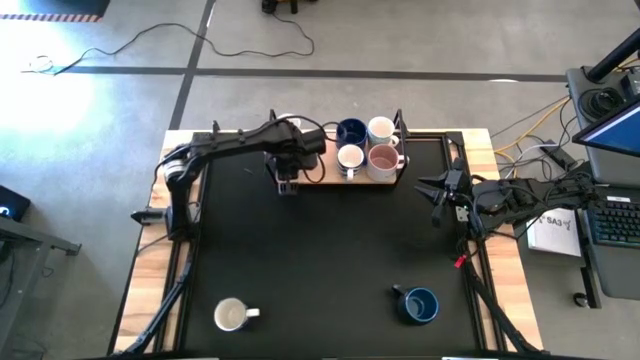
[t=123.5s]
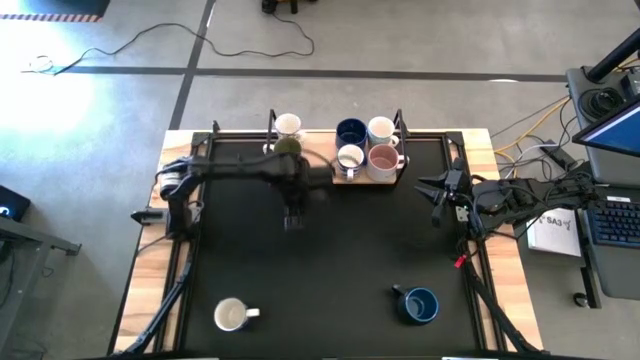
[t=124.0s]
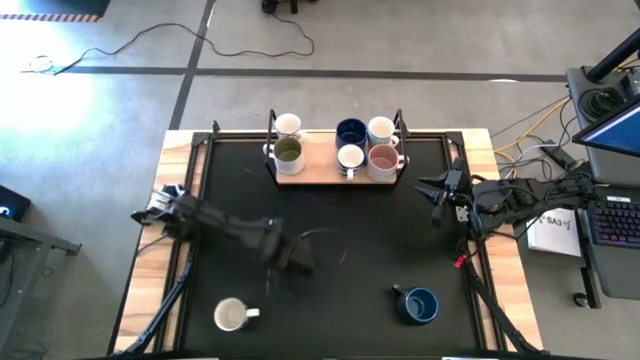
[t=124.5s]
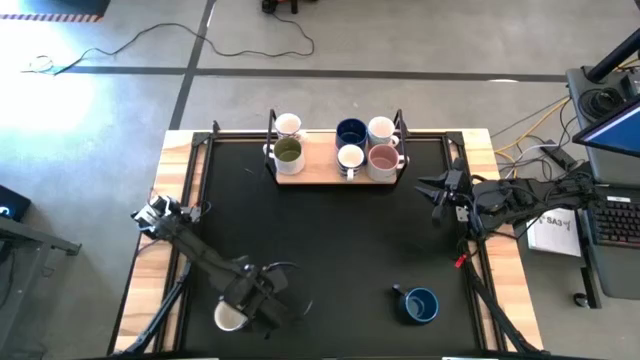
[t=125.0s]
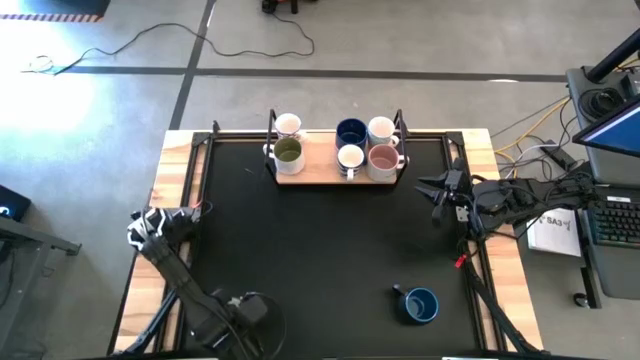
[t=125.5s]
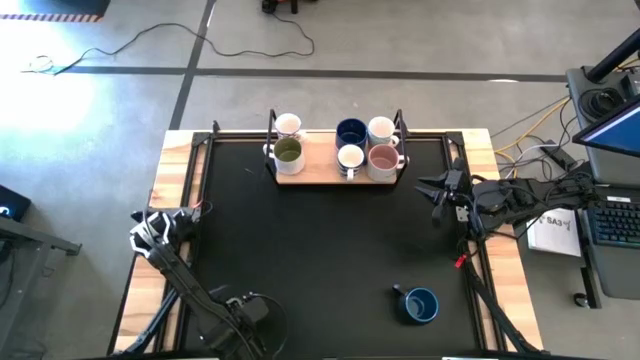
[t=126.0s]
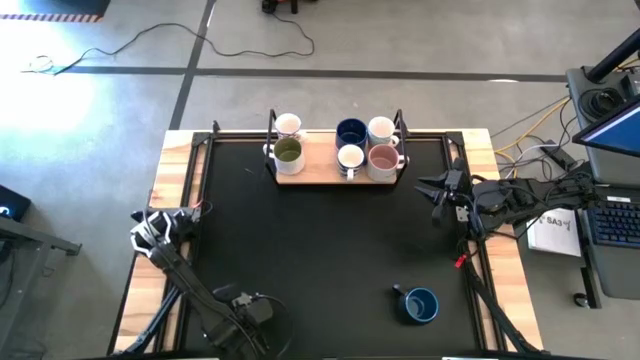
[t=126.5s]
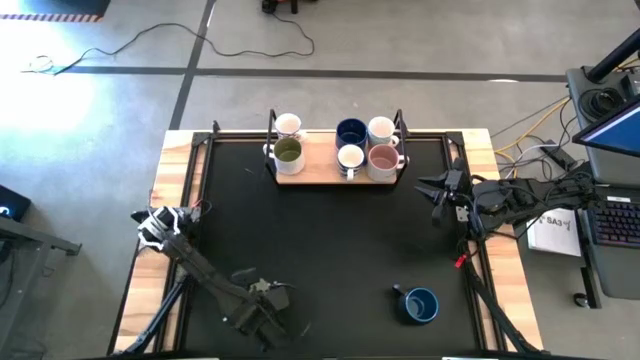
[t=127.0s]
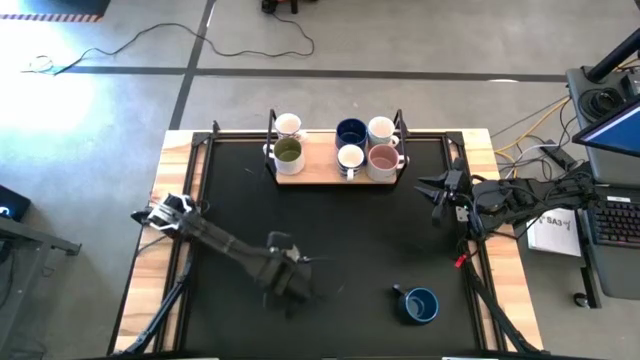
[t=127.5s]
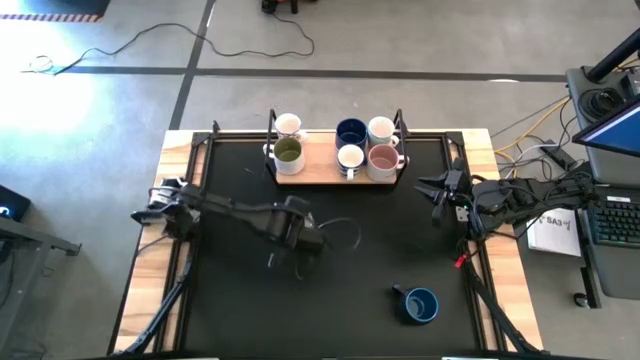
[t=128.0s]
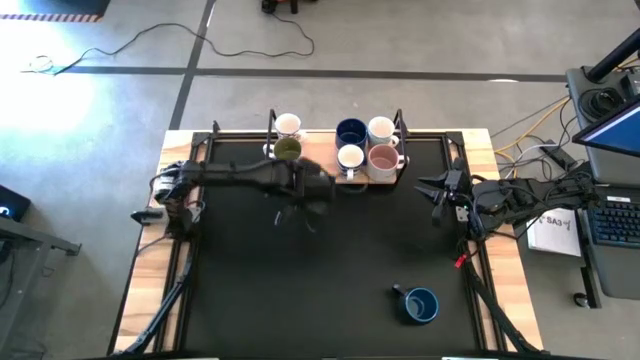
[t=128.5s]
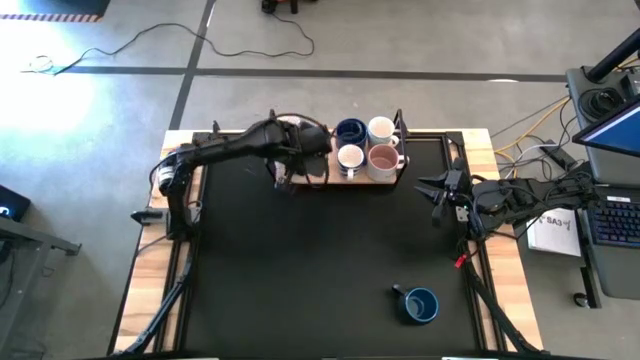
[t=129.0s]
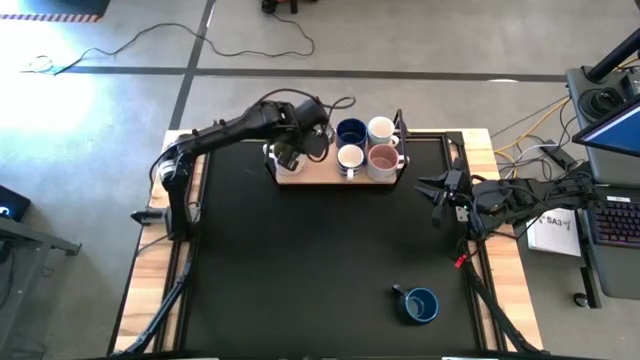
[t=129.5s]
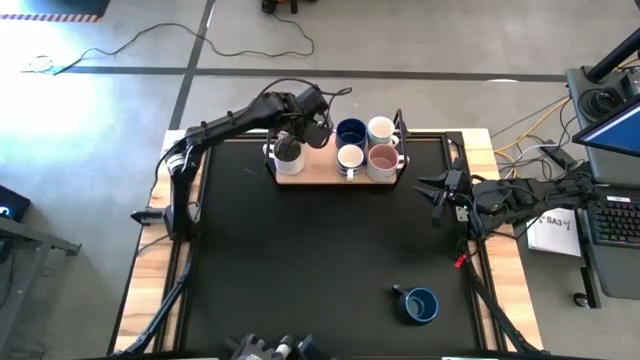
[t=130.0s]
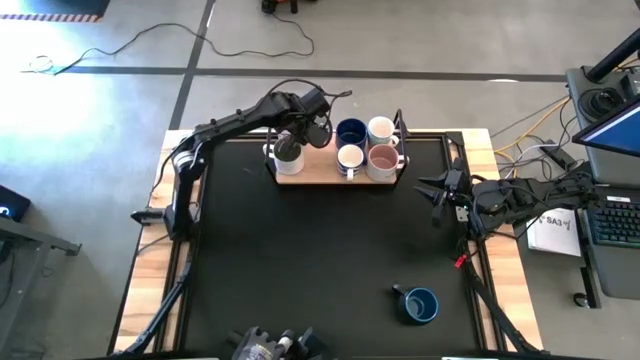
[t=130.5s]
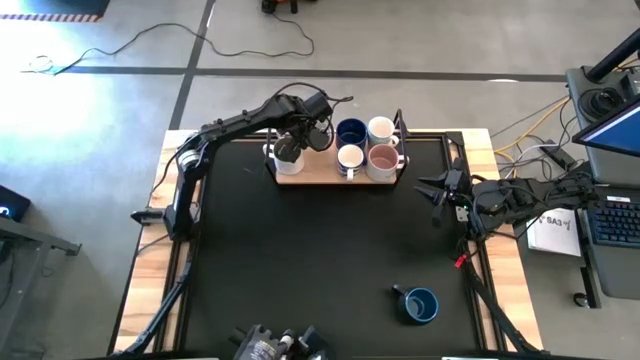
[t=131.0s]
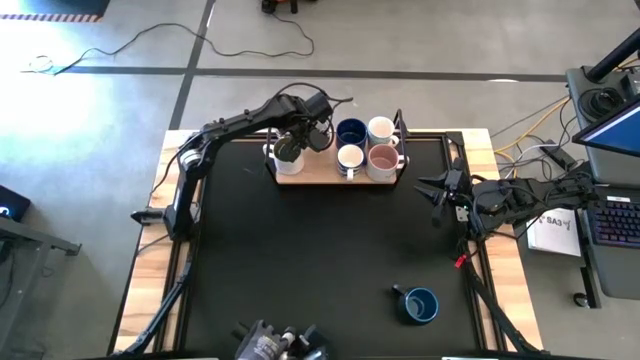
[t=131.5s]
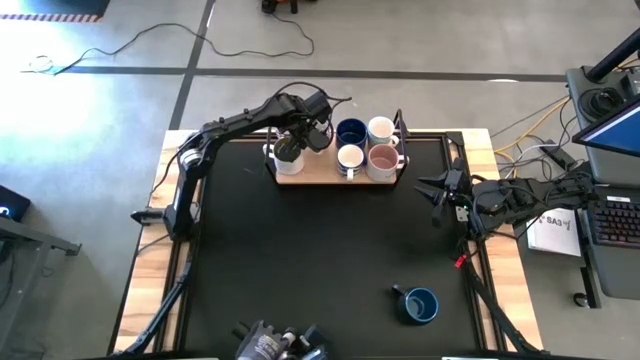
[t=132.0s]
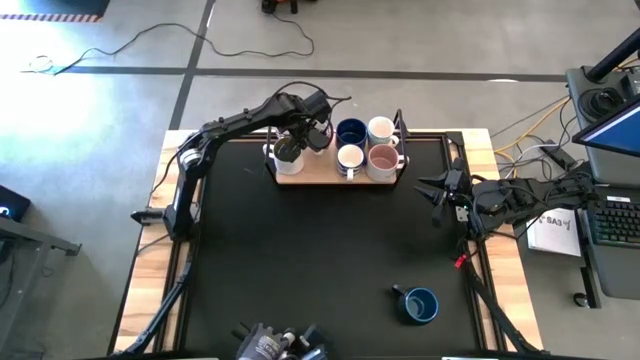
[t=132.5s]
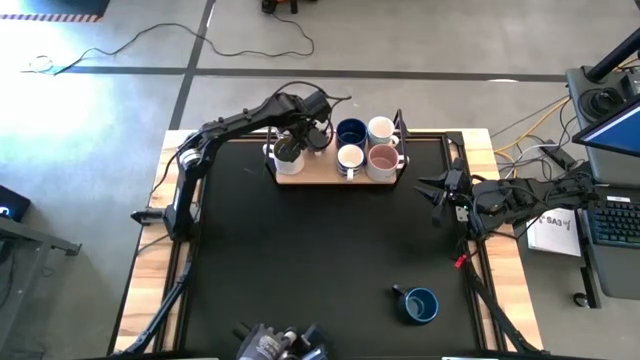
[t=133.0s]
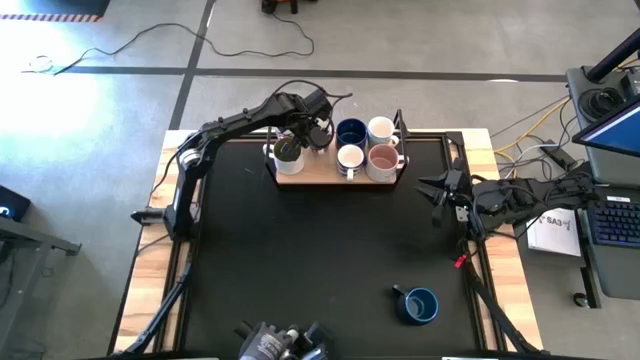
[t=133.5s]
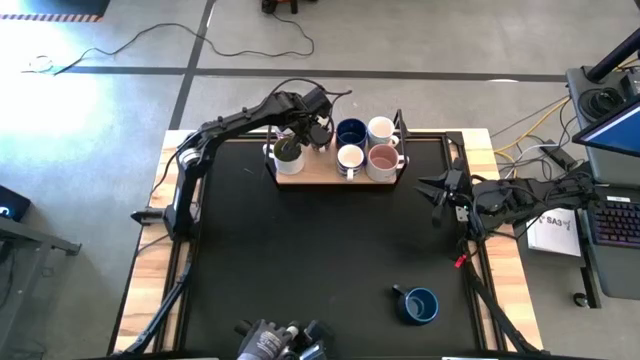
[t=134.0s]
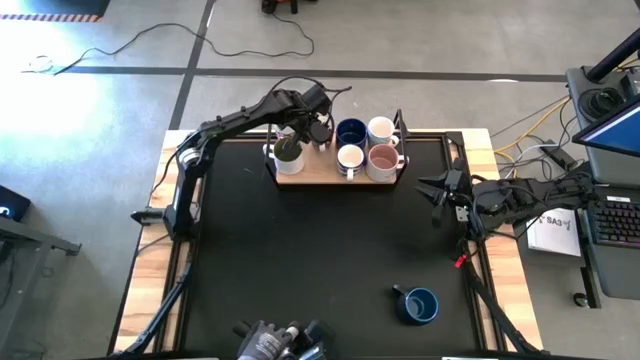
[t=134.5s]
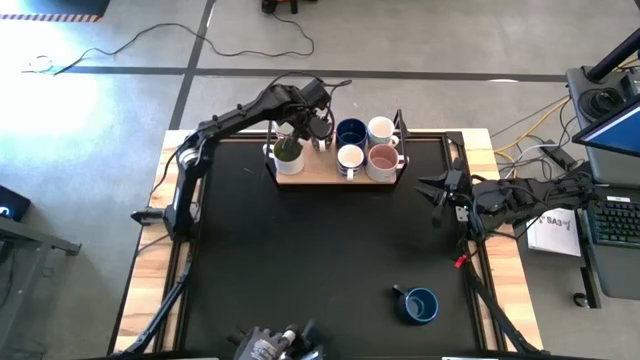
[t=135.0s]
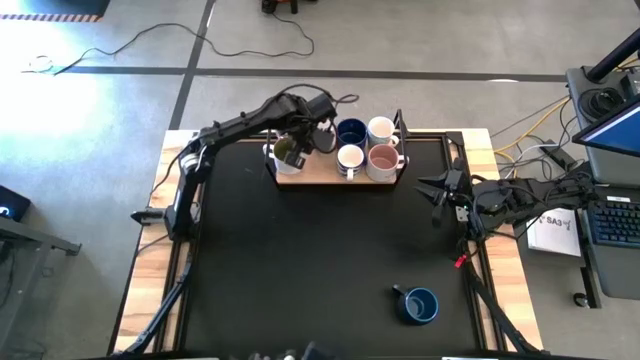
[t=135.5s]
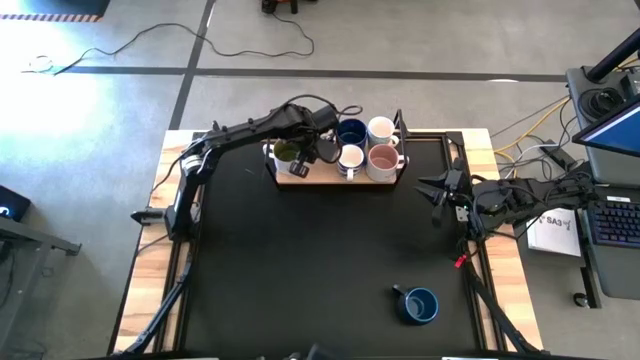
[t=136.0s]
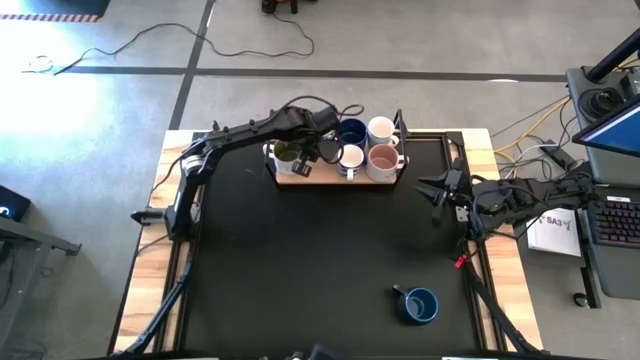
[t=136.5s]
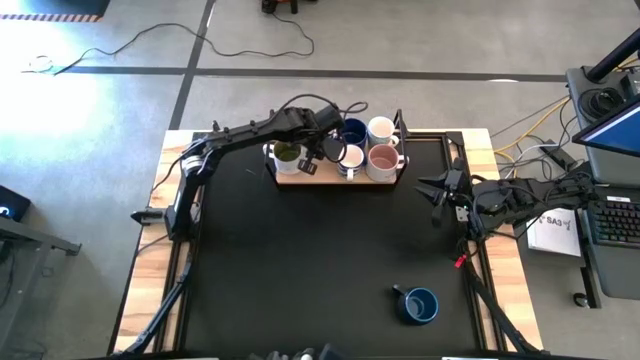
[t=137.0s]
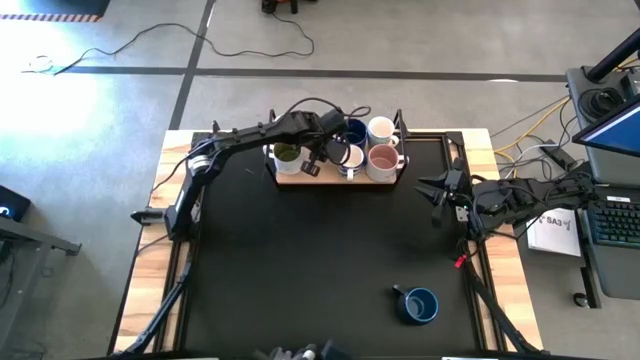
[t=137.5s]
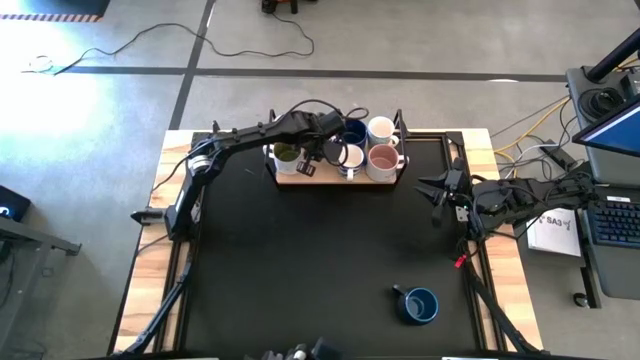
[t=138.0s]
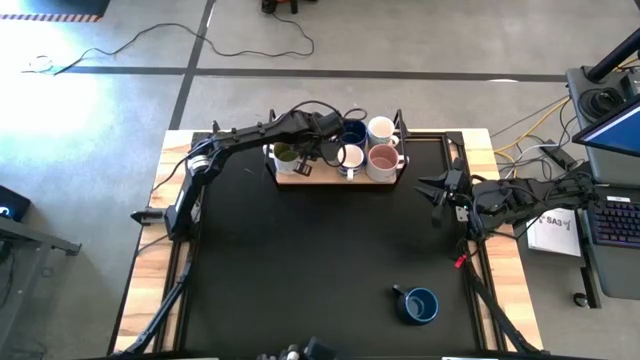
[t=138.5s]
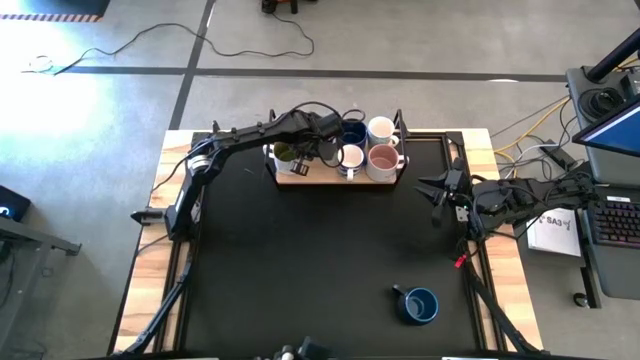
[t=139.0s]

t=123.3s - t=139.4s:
Task: Place coffee mugs
Put the blue mug on the shelf

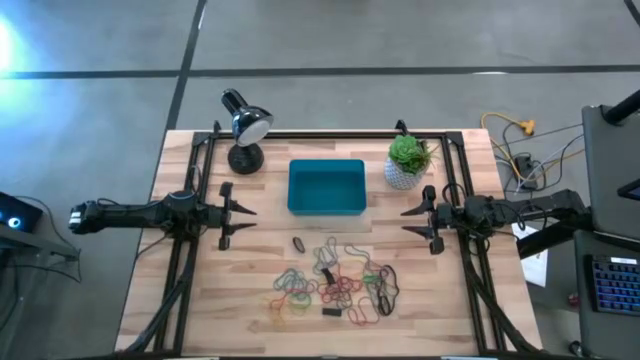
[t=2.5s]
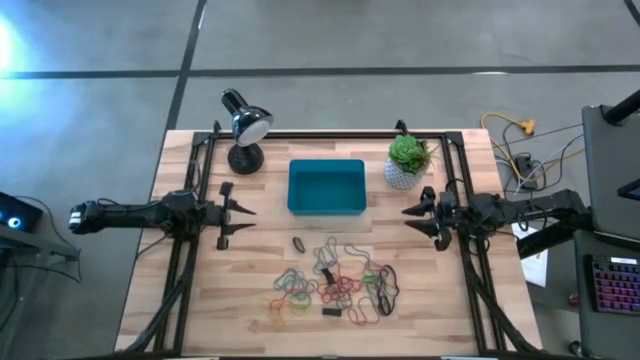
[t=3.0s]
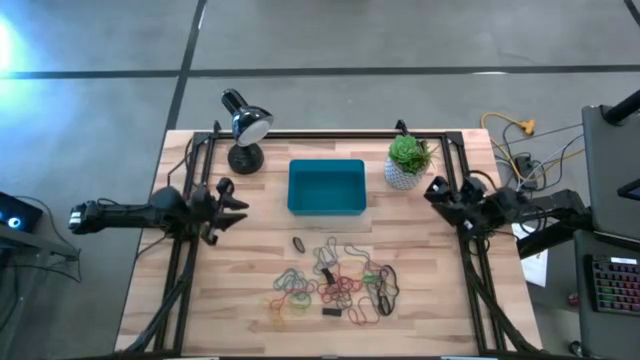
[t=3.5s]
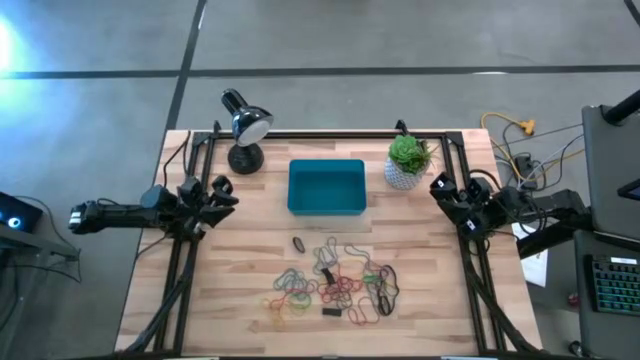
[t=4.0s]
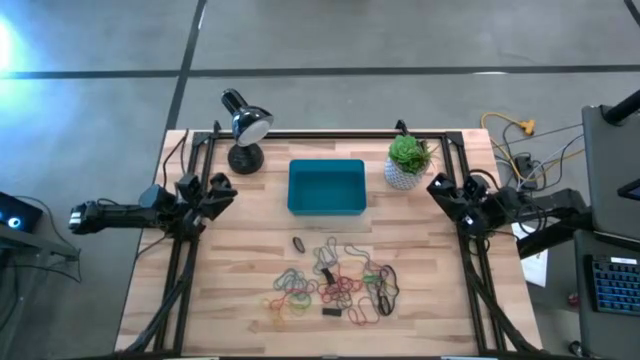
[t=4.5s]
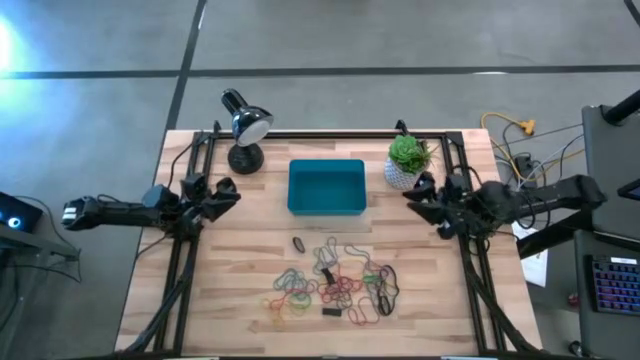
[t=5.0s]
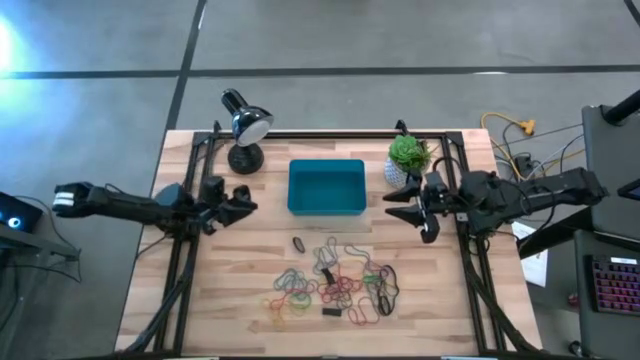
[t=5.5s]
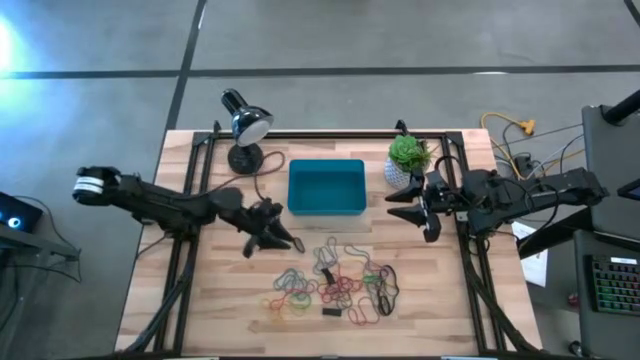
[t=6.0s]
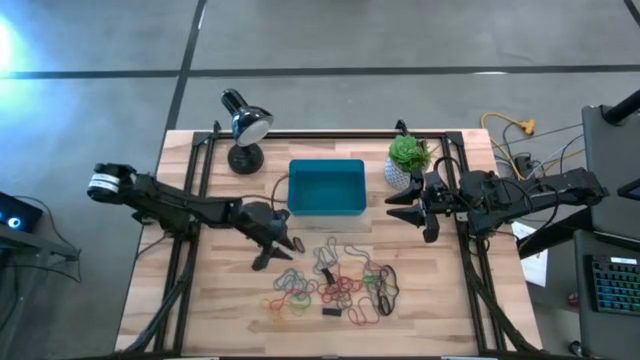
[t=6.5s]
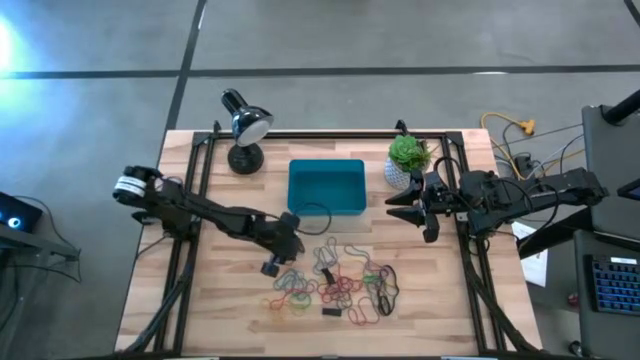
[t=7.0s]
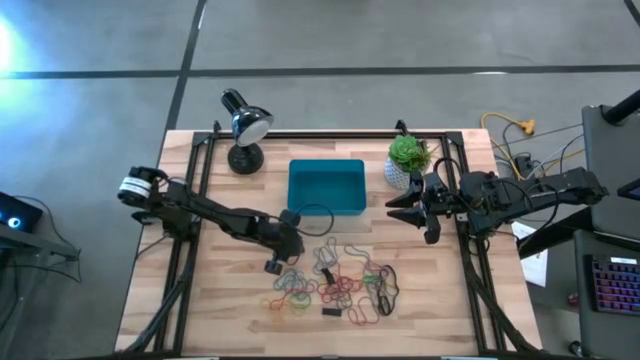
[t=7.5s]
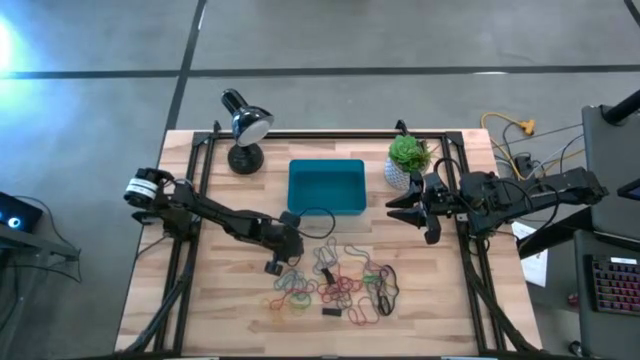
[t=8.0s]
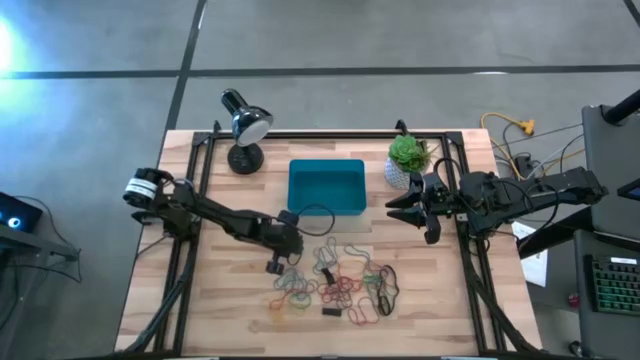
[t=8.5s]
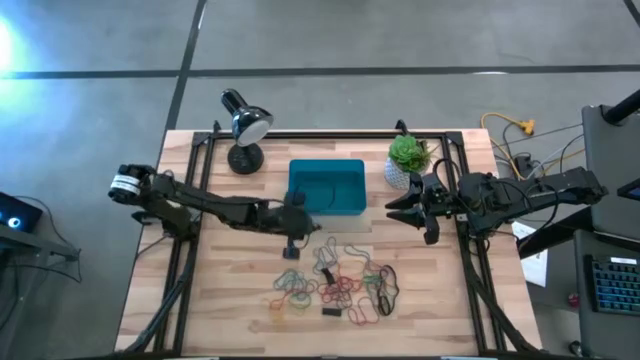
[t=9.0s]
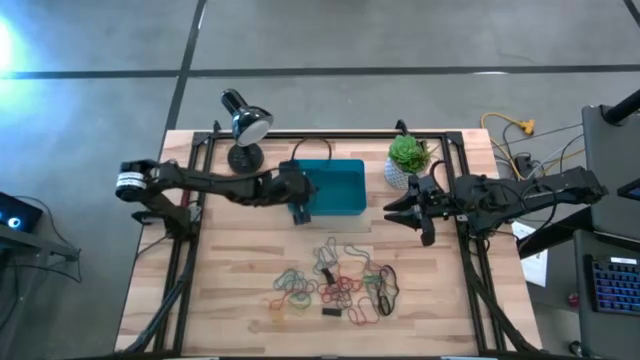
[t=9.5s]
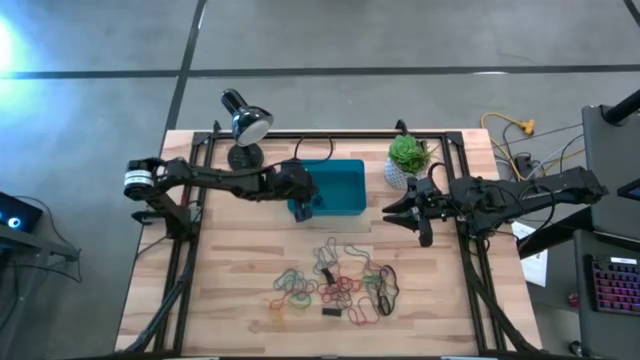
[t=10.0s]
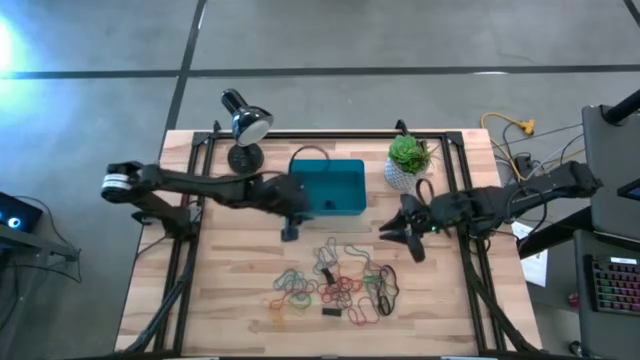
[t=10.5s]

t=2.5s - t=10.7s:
Task: Pick and place rubber bands into bin
Put the top black rubber band into the dark blue bin
